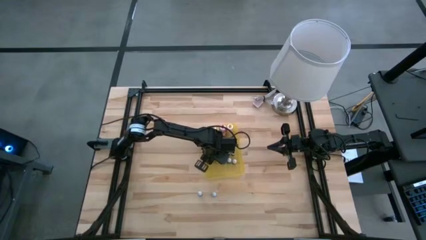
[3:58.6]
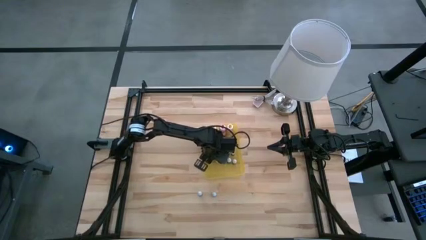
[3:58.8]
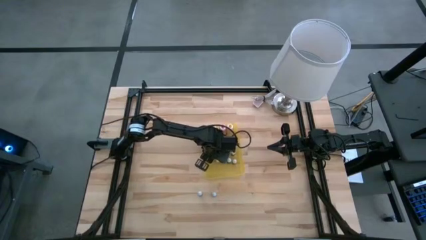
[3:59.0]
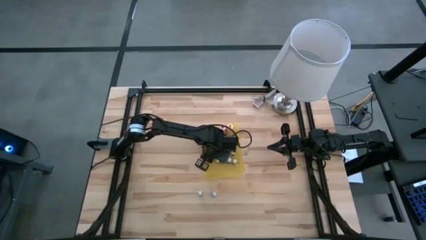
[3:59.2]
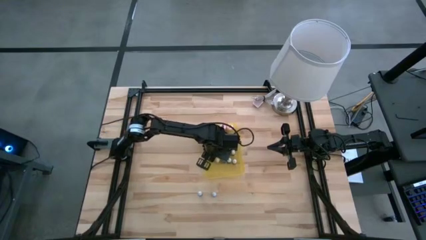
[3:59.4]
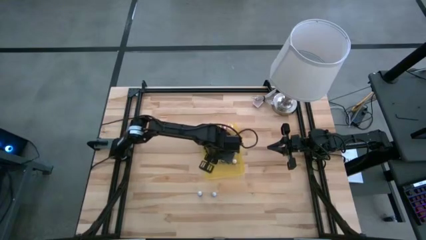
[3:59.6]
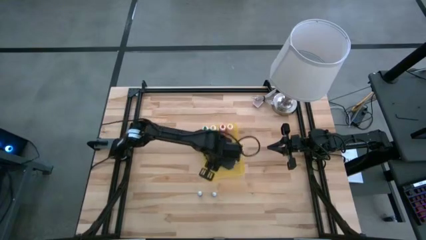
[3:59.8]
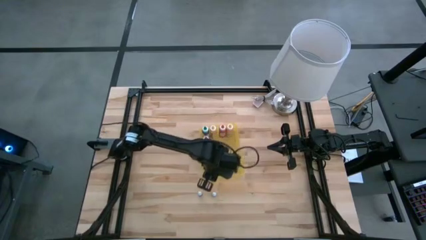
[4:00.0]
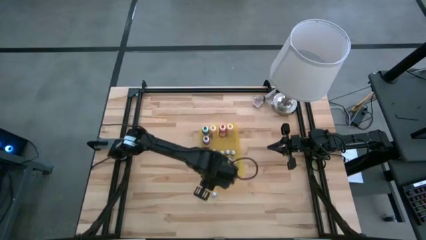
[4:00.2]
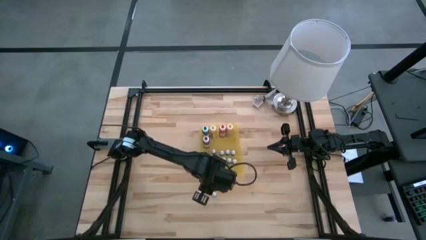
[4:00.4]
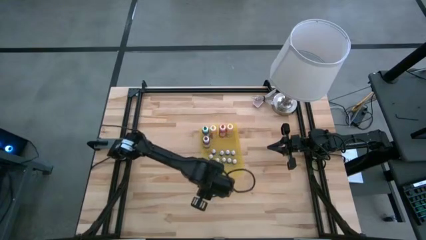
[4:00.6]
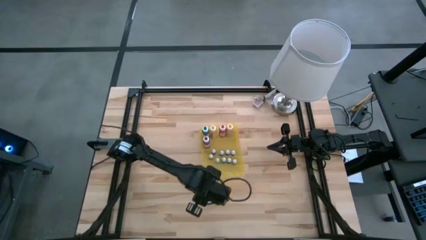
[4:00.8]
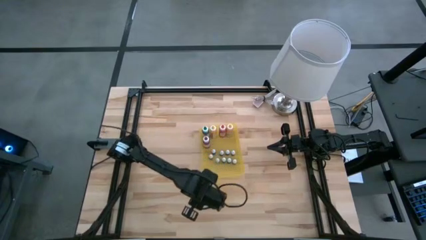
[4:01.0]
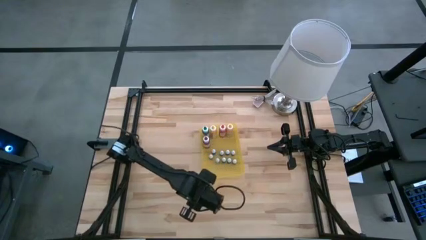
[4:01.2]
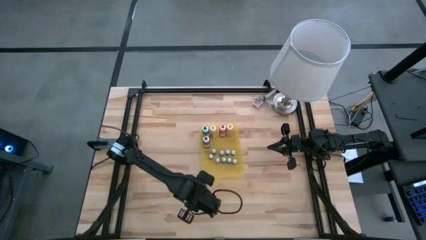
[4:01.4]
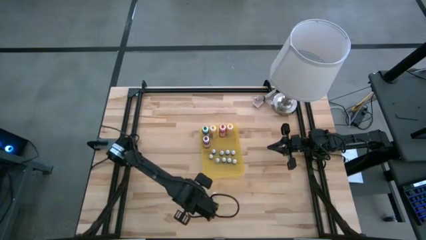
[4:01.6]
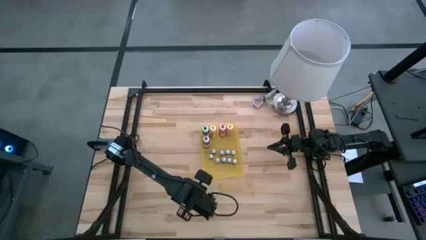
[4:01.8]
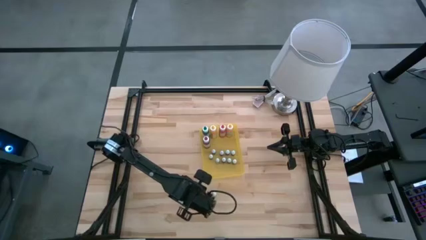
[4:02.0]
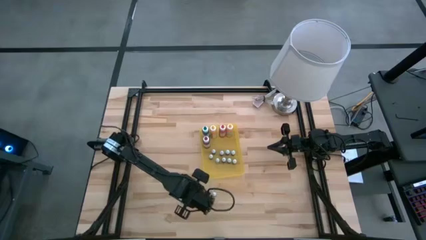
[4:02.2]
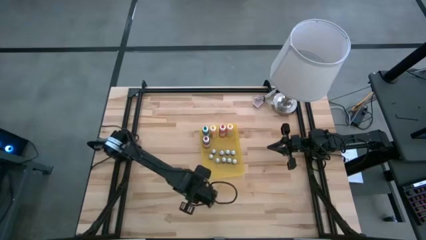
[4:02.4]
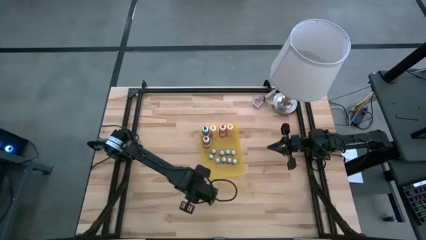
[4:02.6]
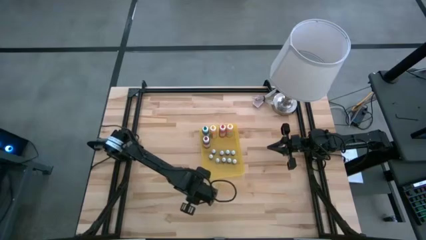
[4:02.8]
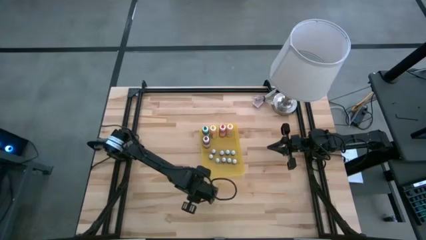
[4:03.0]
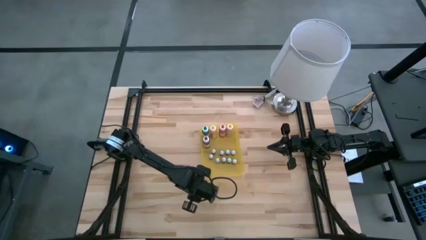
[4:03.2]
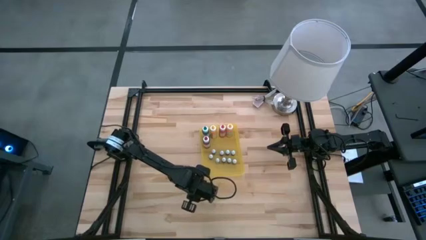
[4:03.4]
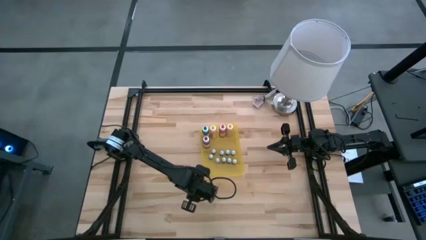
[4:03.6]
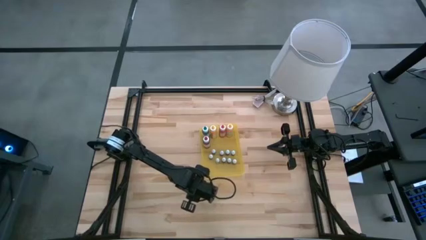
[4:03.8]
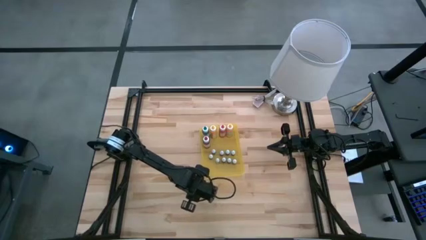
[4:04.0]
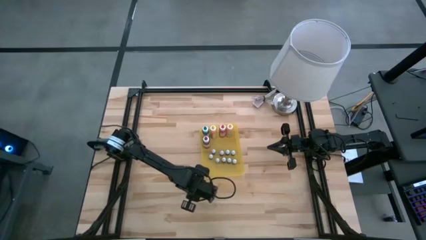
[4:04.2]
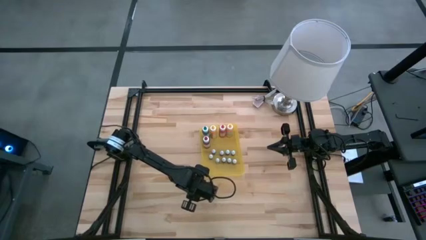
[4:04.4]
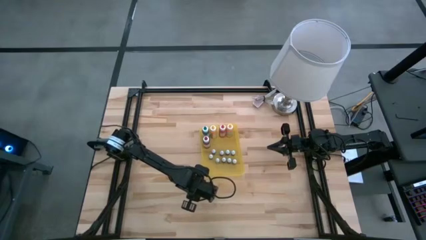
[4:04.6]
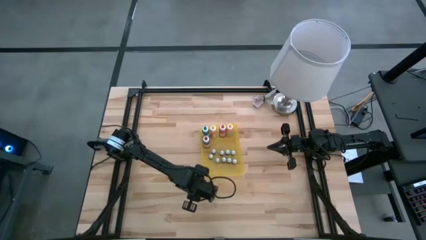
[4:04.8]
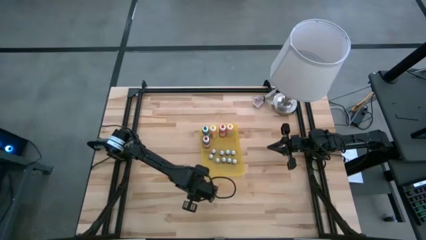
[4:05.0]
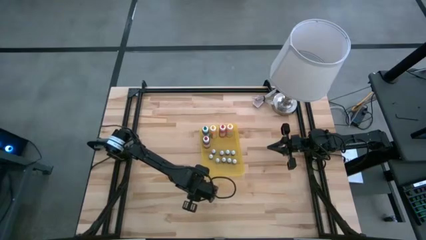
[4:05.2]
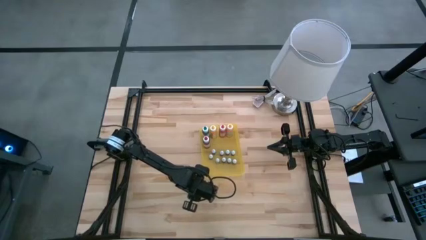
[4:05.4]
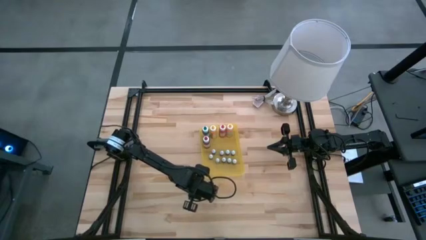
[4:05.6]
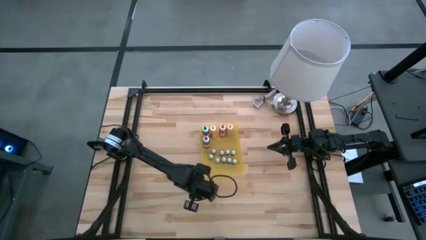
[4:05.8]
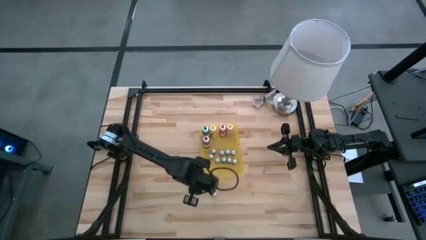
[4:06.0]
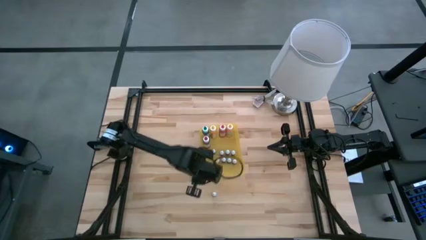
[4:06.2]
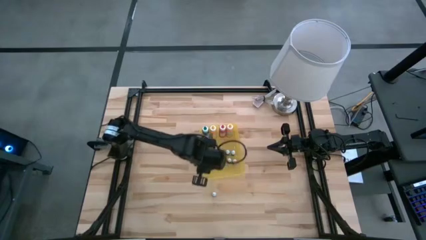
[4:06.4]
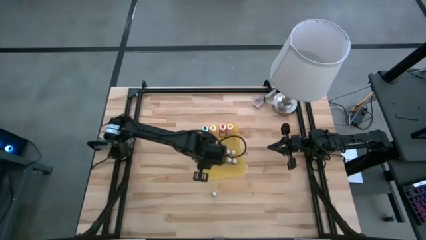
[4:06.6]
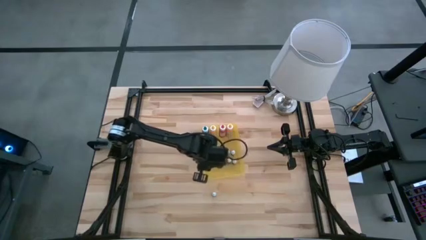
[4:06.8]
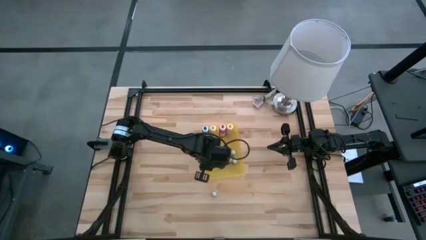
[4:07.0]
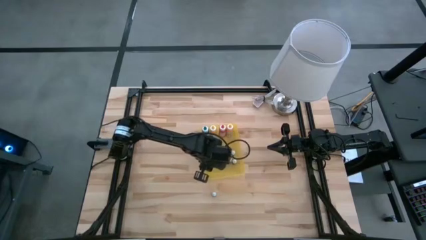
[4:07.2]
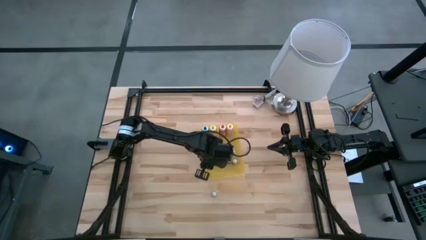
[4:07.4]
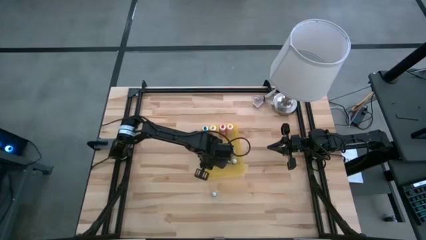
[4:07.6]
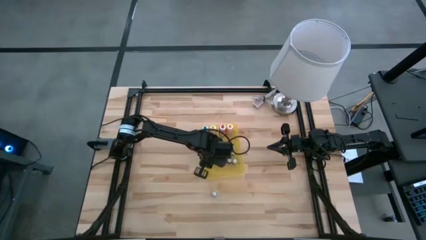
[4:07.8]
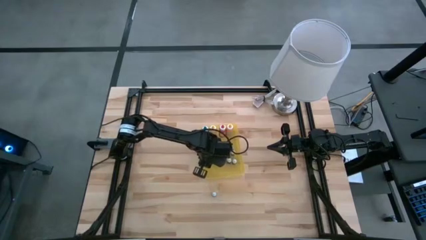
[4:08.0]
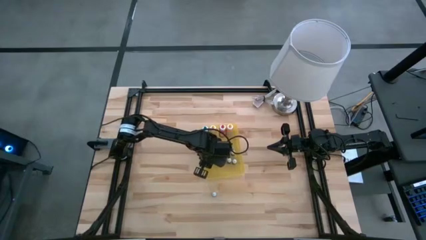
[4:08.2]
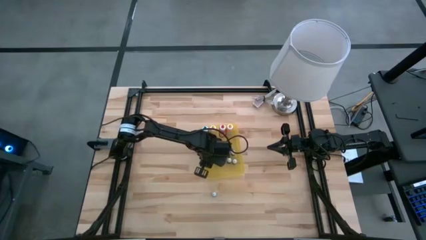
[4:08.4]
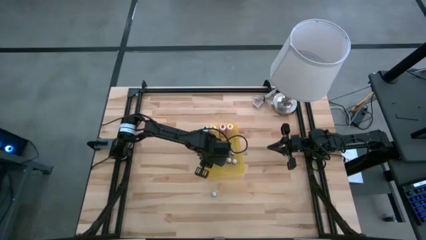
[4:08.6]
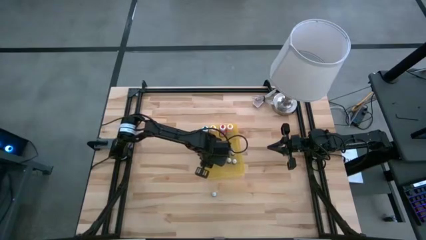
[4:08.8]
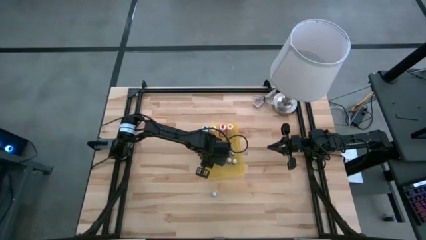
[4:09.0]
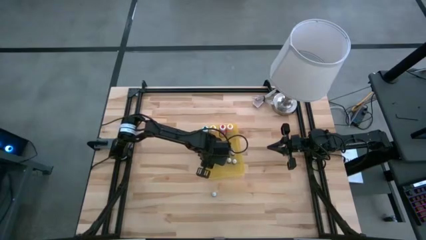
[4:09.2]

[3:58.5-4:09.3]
Task: Pick & Place food coloring
Put the small blue food coloring bottle into the bin

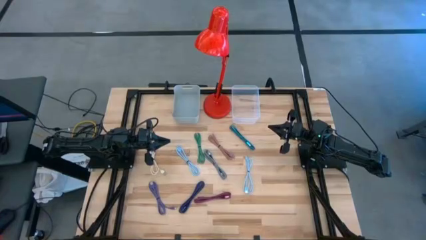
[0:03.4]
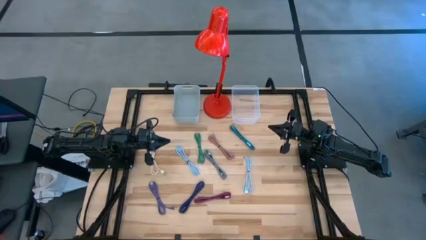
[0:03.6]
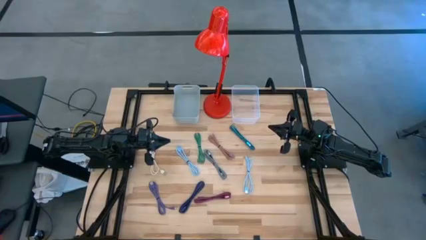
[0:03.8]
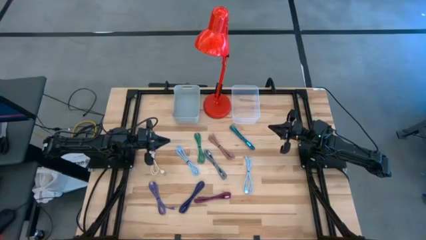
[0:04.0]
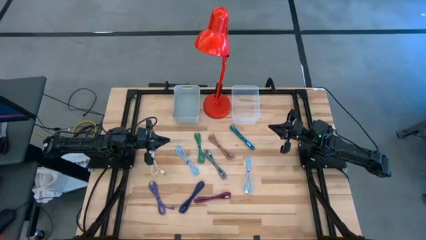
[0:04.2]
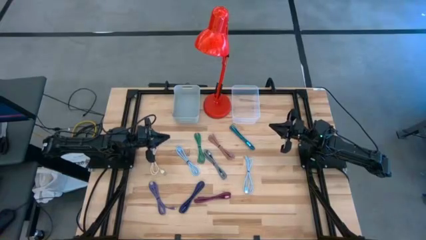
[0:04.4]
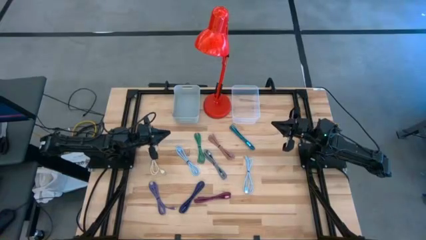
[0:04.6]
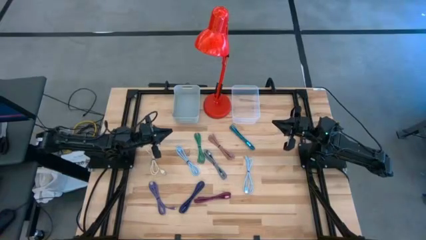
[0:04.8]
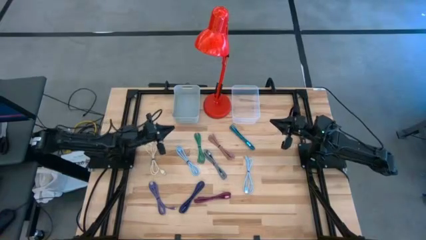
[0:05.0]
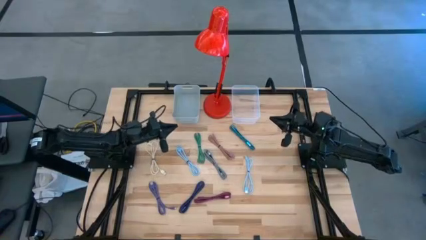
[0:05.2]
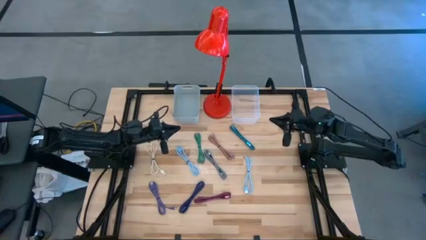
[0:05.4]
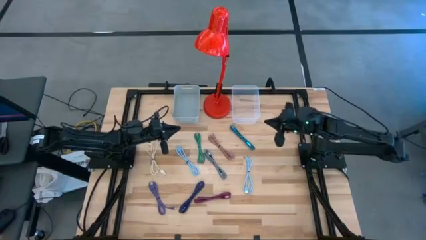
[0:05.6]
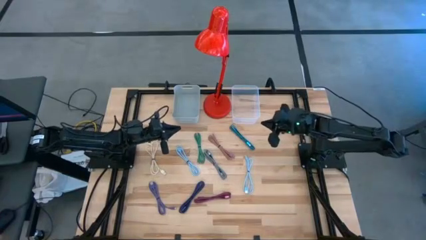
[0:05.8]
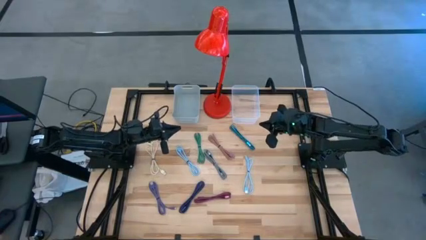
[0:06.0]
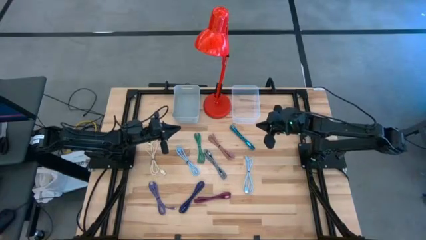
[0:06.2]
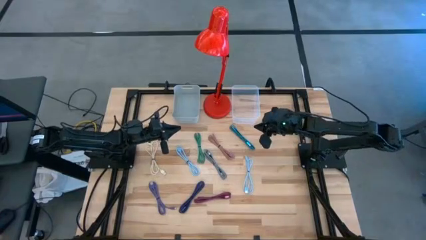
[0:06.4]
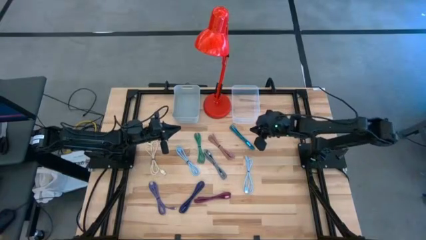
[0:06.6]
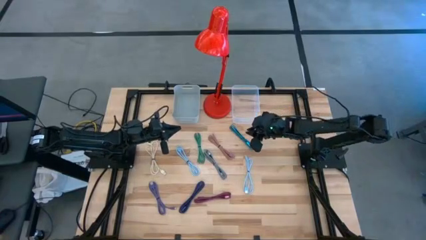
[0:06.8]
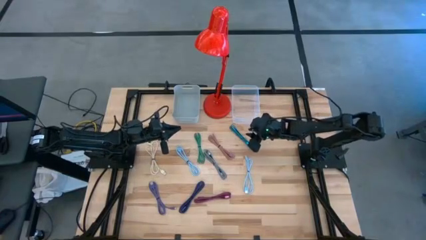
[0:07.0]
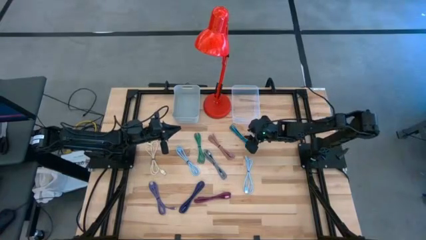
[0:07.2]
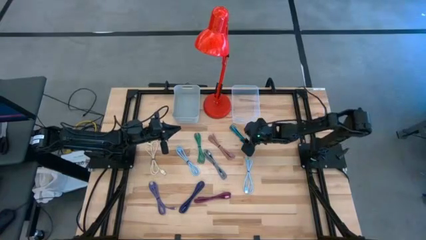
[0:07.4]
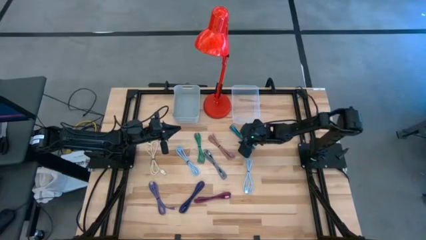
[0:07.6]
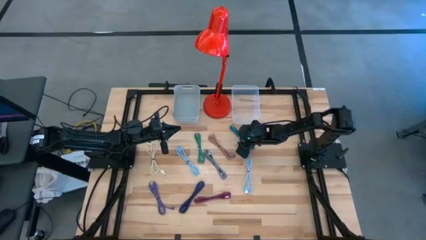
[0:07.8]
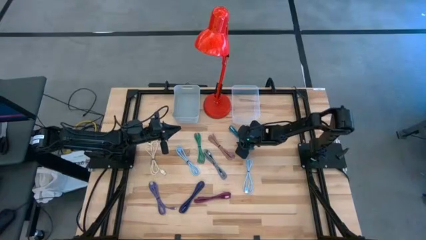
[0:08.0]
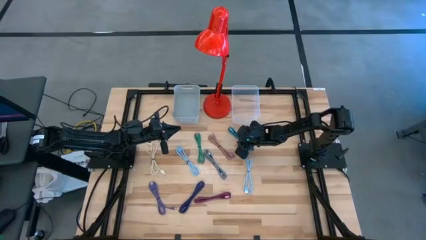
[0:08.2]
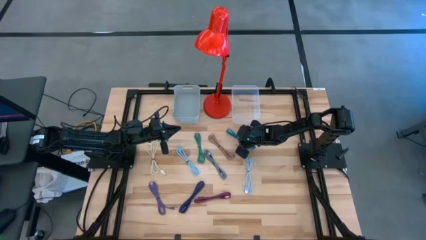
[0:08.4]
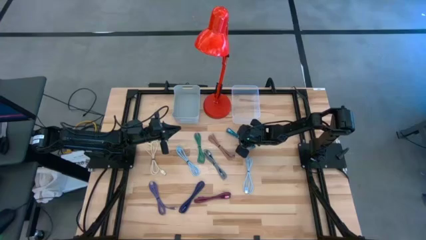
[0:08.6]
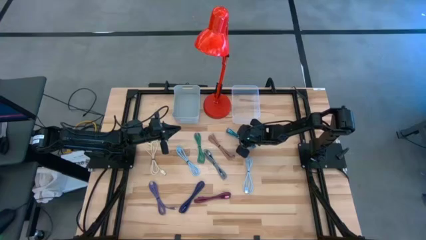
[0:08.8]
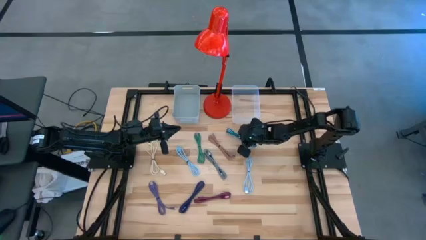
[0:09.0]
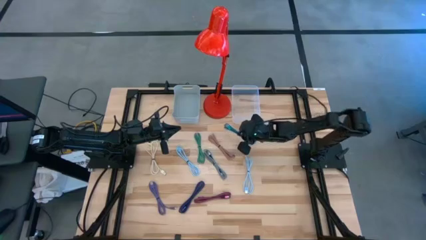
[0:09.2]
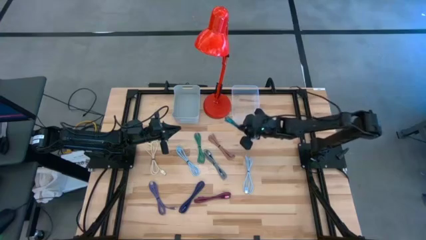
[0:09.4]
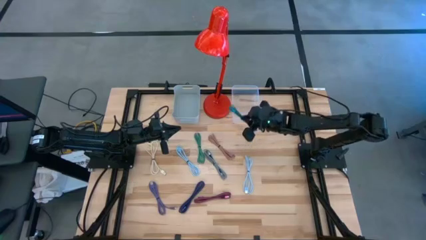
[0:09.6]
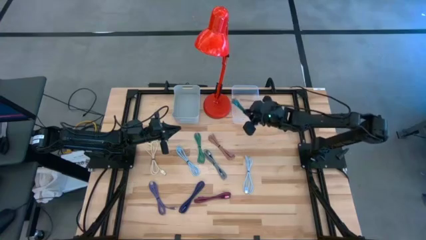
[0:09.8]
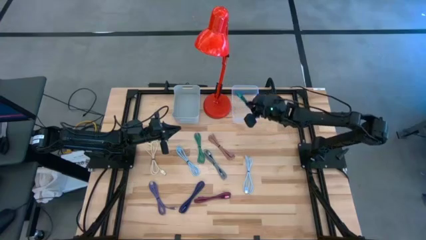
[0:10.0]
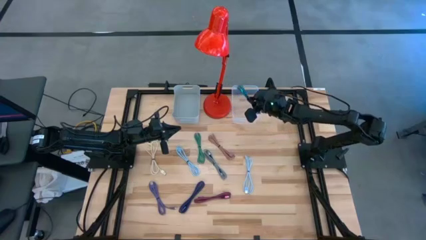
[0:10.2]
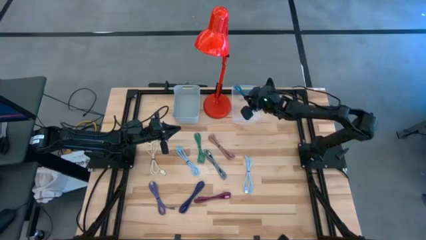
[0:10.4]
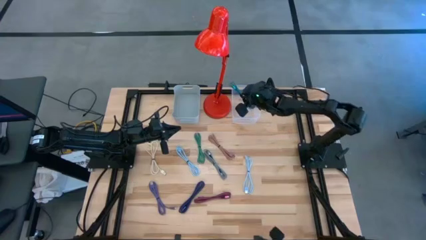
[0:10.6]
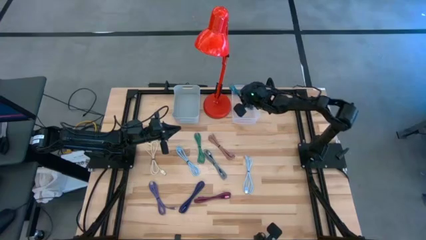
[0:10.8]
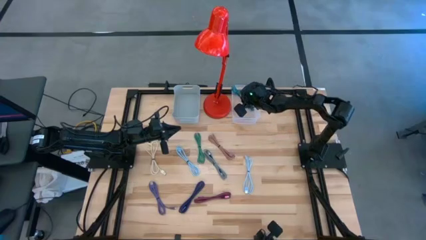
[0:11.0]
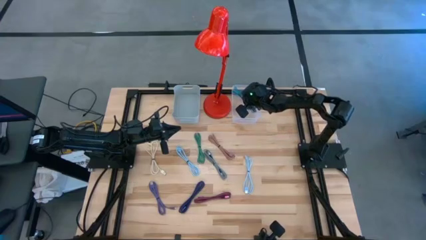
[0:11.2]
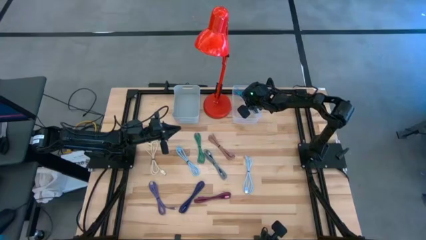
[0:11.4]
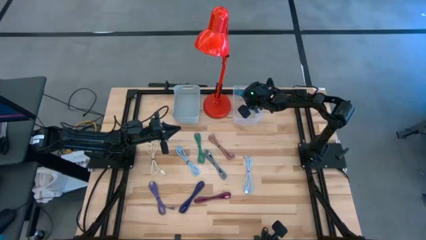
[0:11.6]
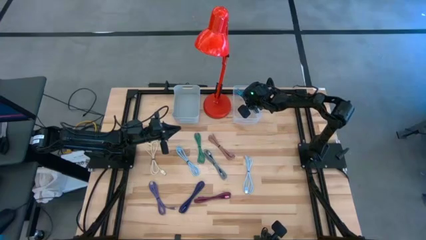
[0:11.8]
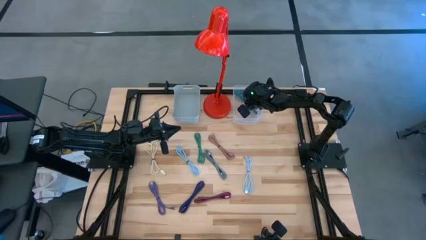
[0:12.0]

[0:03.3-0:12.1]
Task: Pick & Place USB Port
Put the blue and black charger cable into the transparent bin
